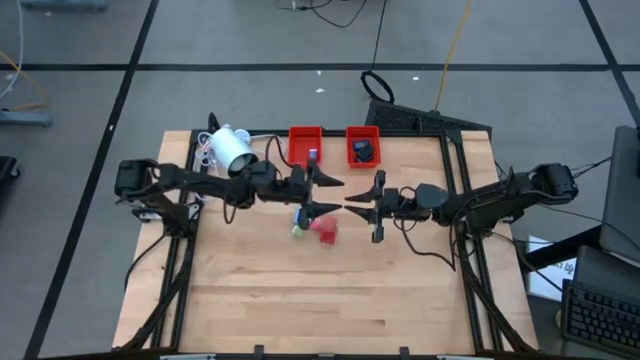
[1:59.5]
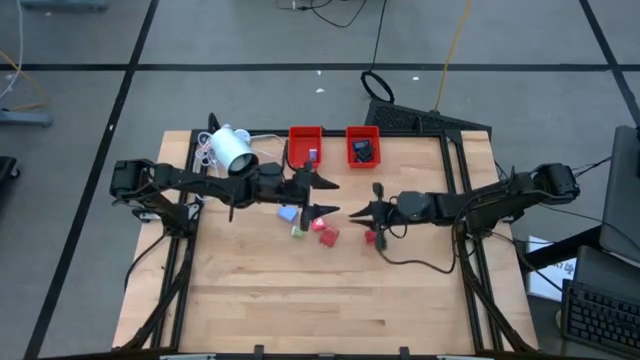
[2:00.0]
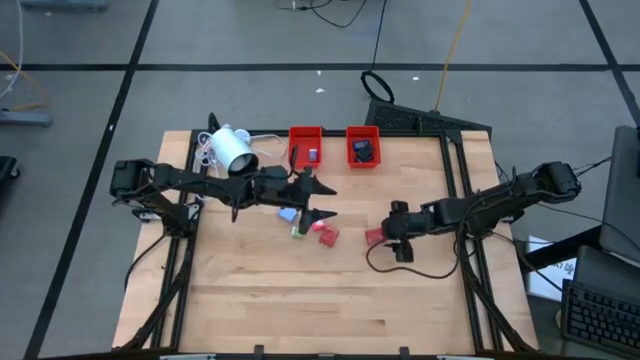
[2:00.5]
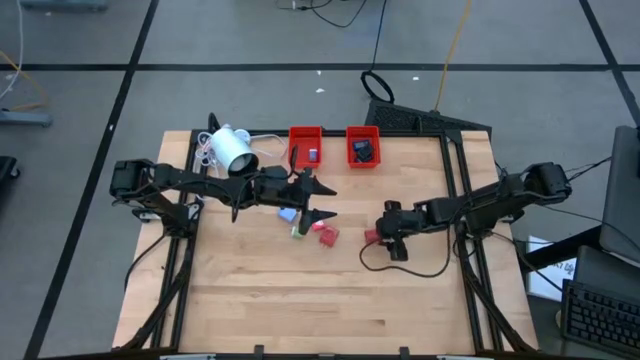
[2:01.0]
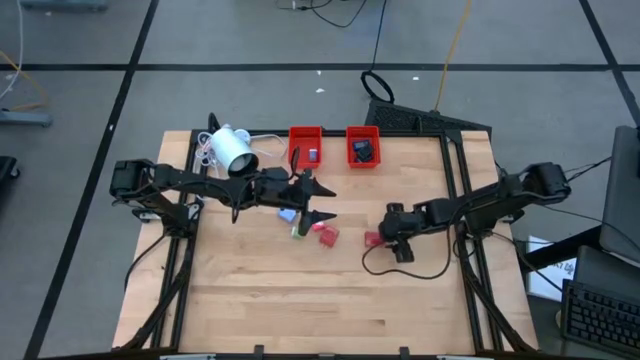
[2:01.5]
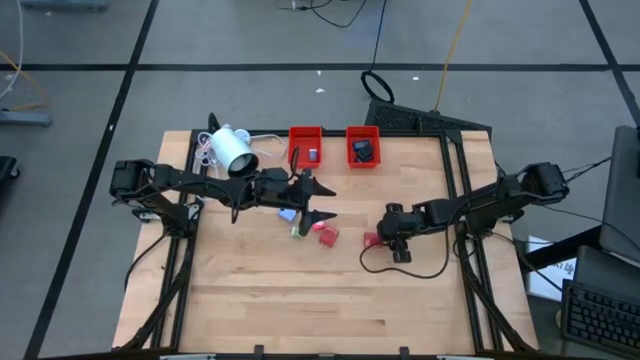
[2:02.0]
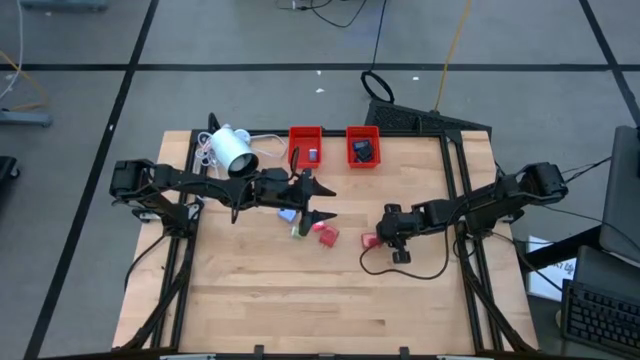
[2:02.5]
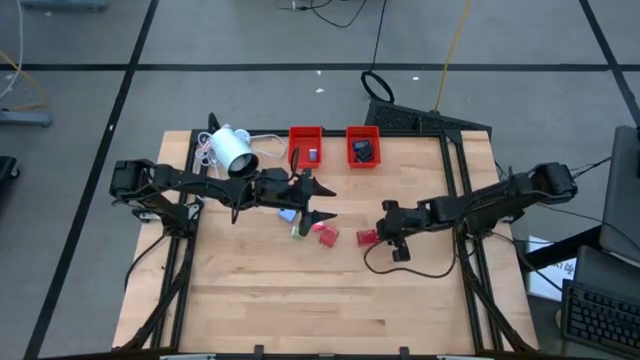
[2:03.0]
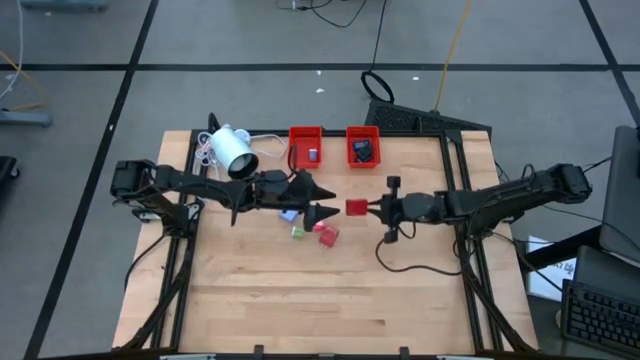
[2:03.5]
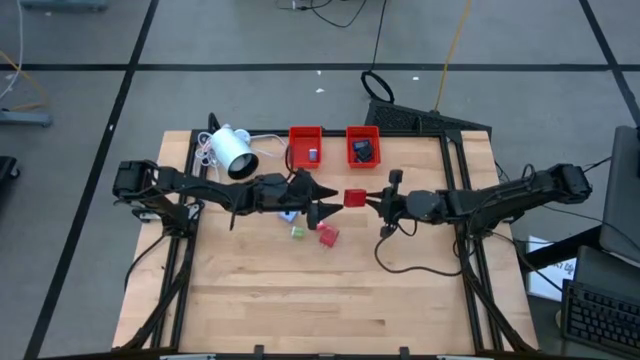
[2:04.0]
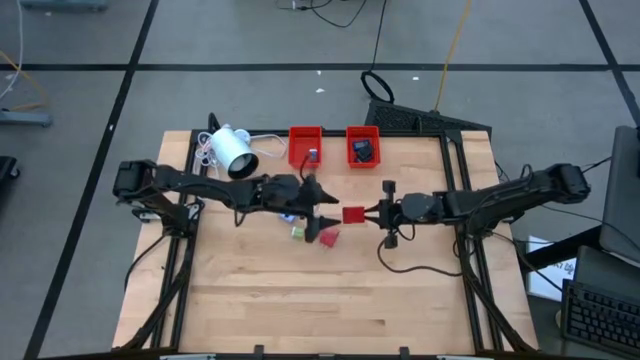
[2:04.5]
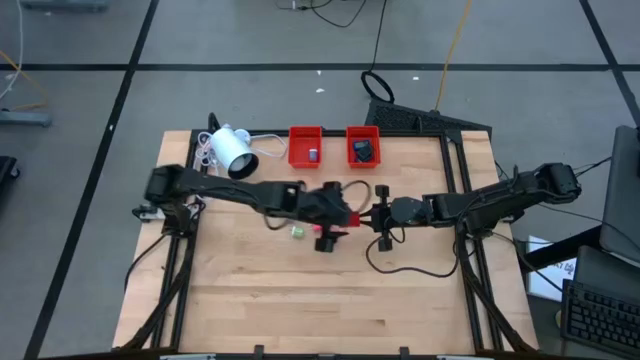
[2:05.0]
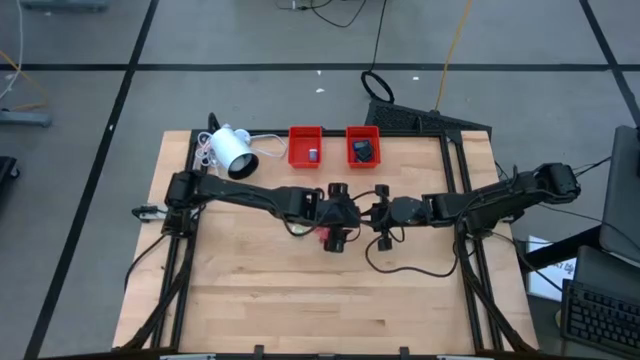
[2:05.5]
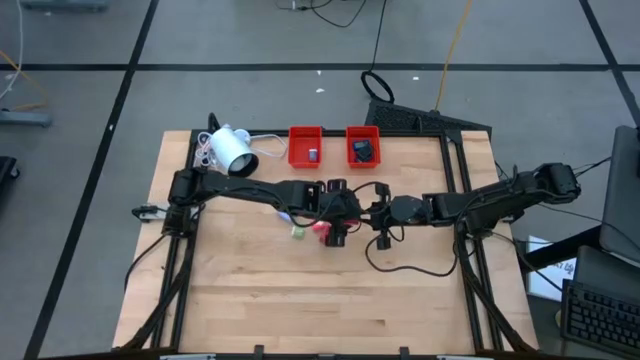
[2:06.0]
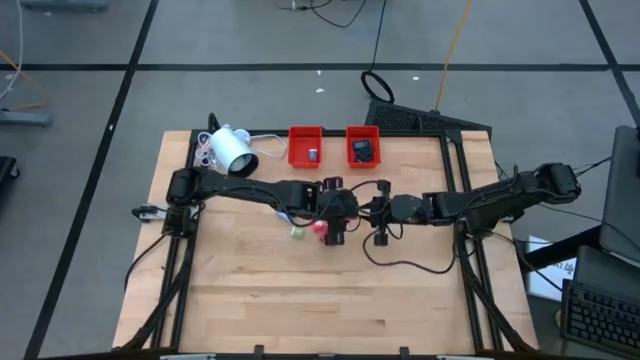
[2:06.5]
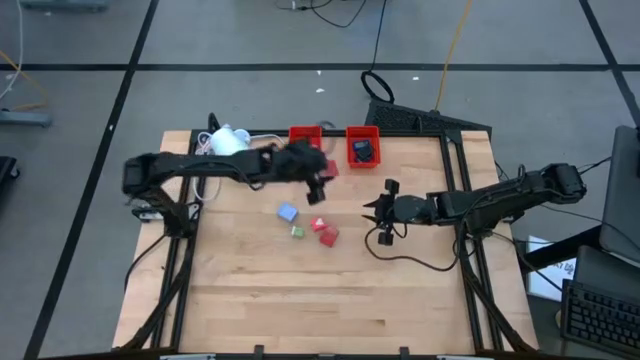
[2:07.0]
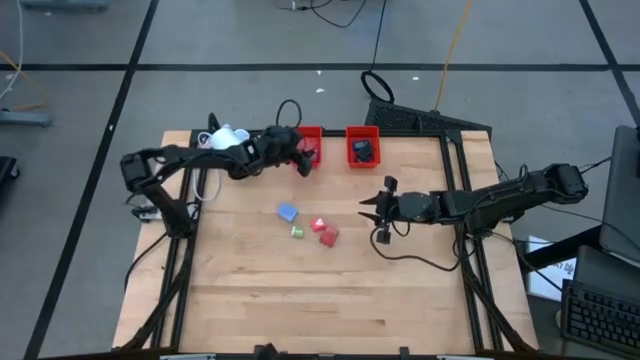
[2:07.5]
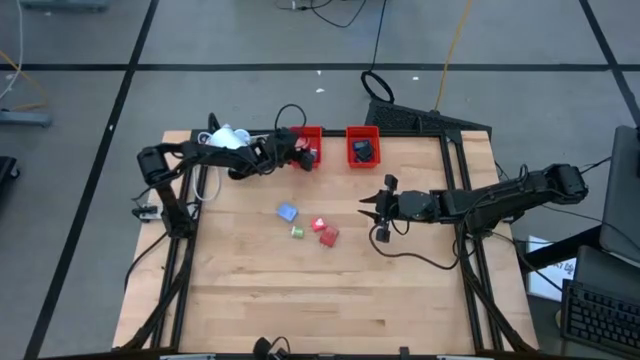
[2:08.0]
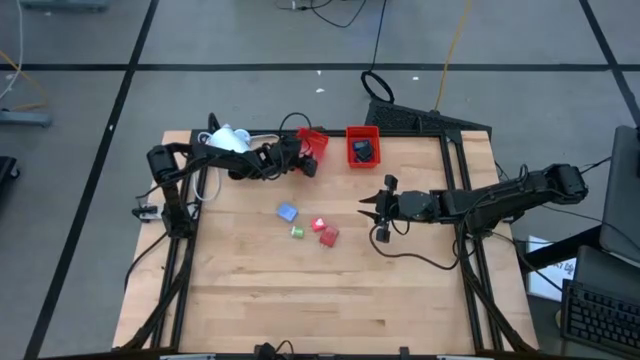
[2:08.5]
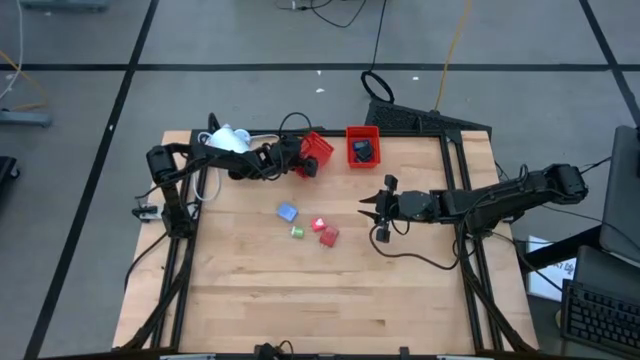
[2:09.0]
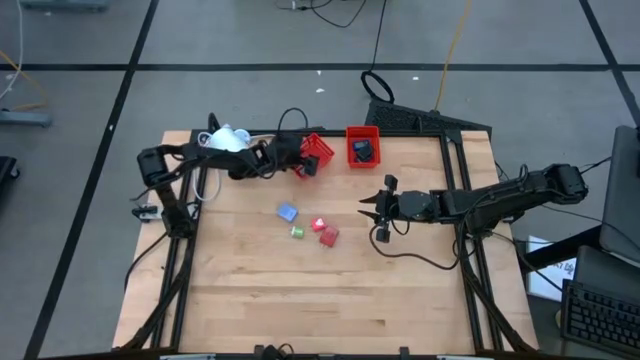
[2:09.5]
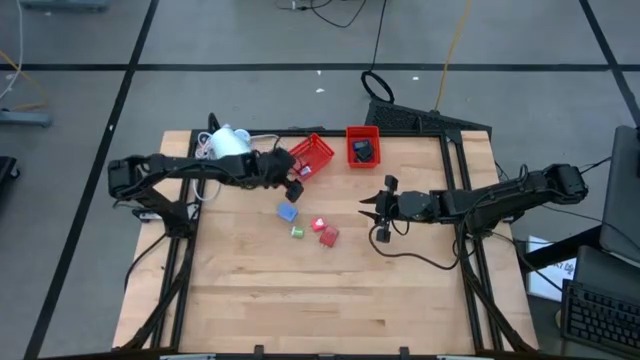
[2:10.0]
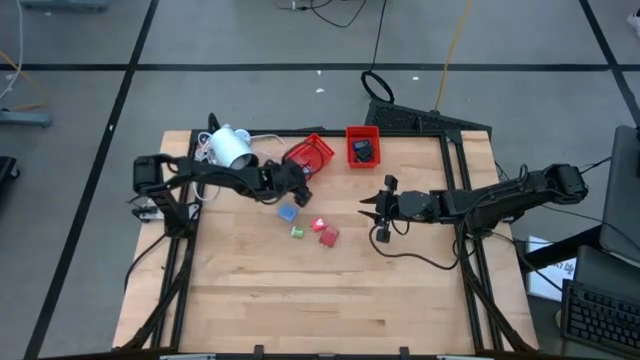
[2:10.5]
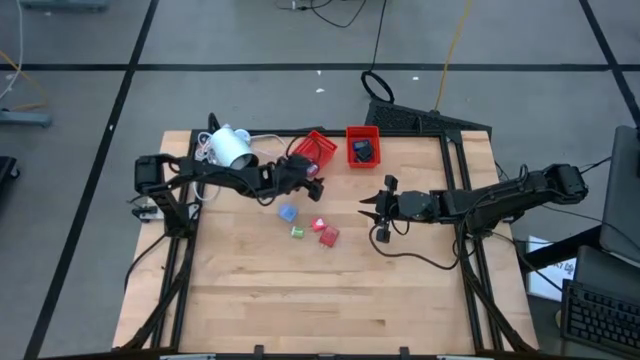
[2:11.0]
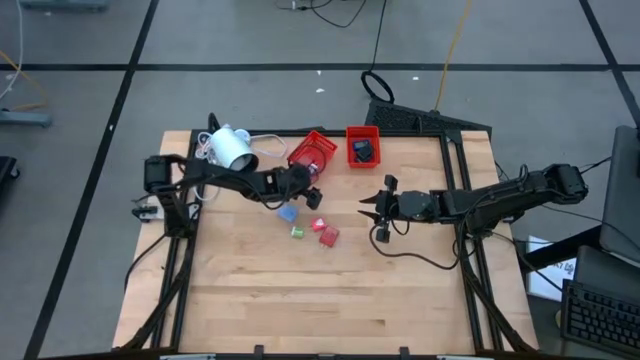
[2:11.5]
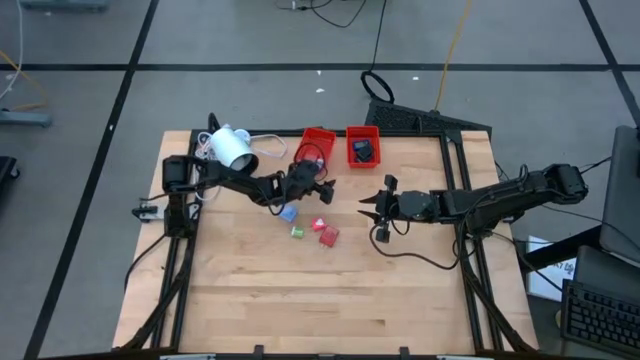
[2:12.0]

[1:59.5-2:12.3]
Task: Pick & Place Office items
Put the right red charger adapter into the left red bin

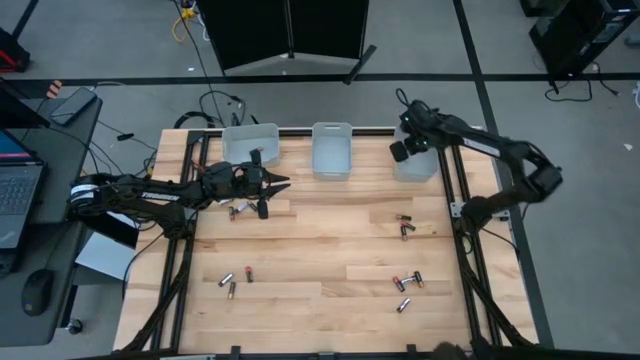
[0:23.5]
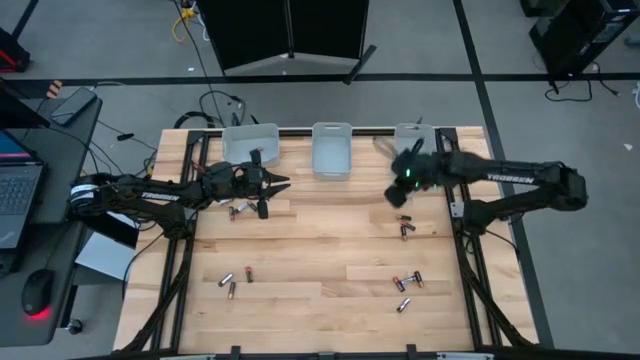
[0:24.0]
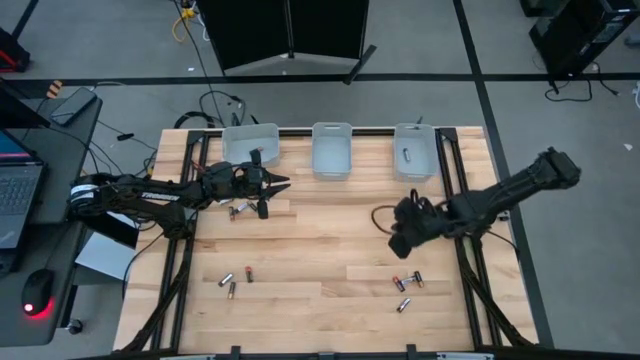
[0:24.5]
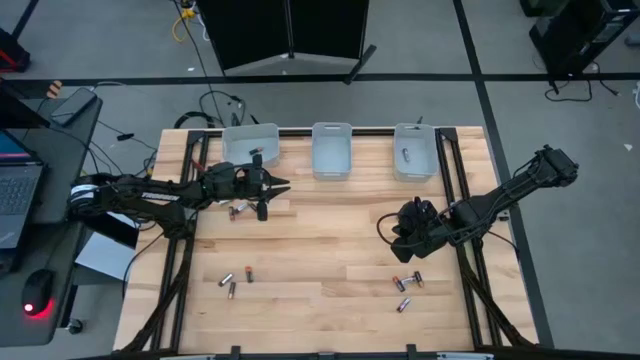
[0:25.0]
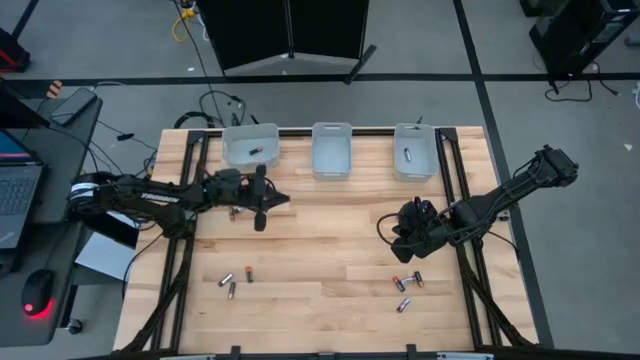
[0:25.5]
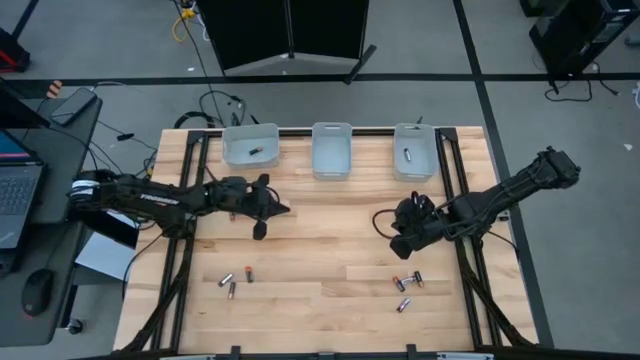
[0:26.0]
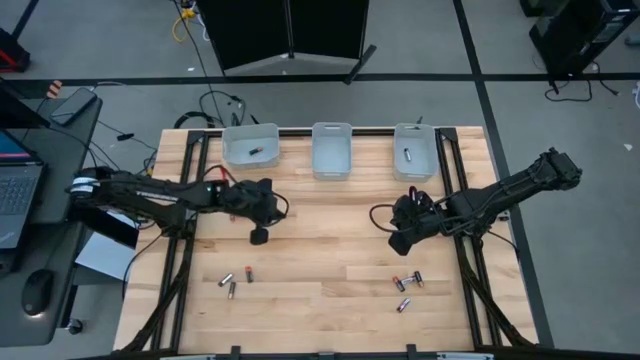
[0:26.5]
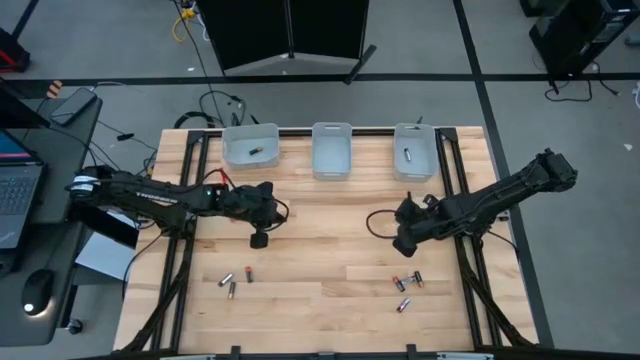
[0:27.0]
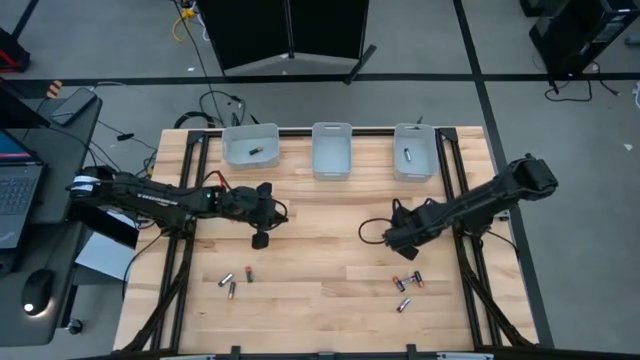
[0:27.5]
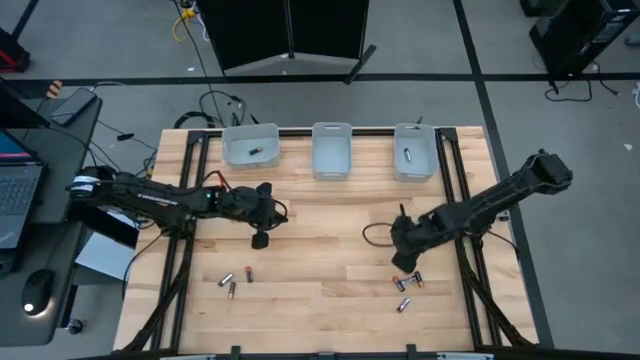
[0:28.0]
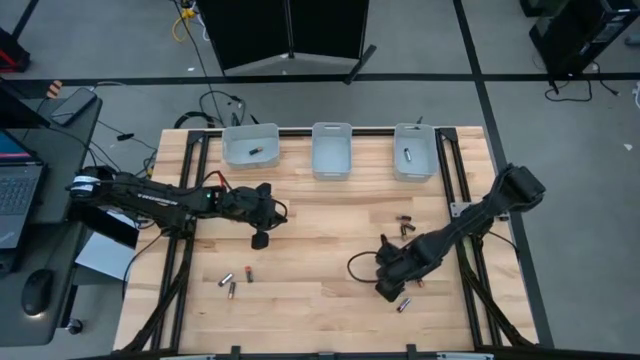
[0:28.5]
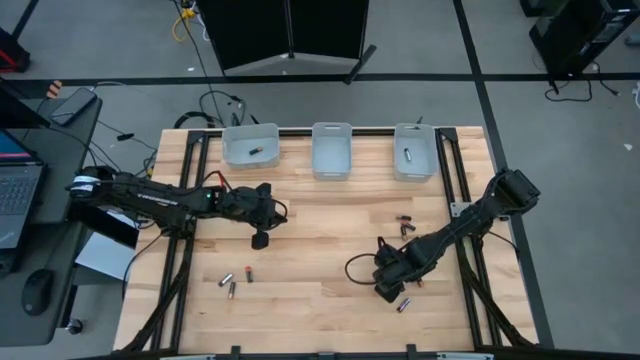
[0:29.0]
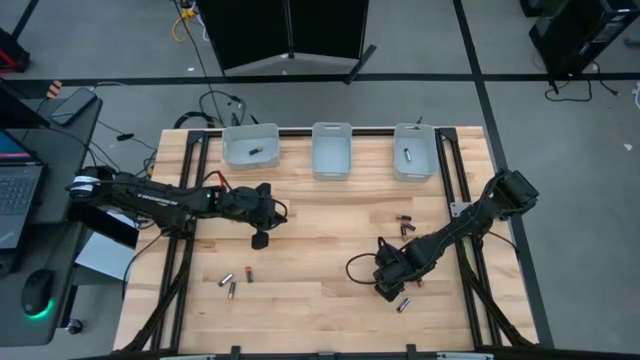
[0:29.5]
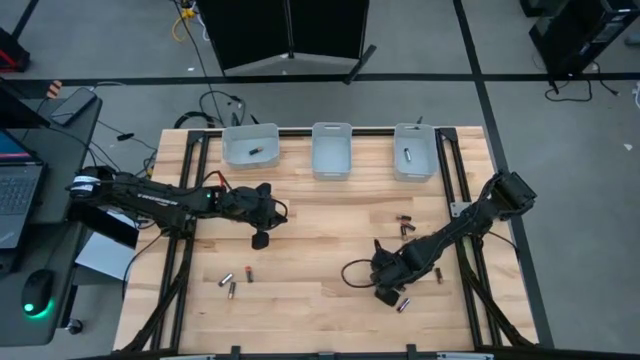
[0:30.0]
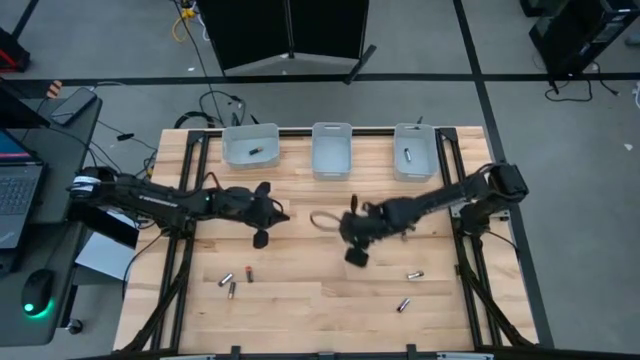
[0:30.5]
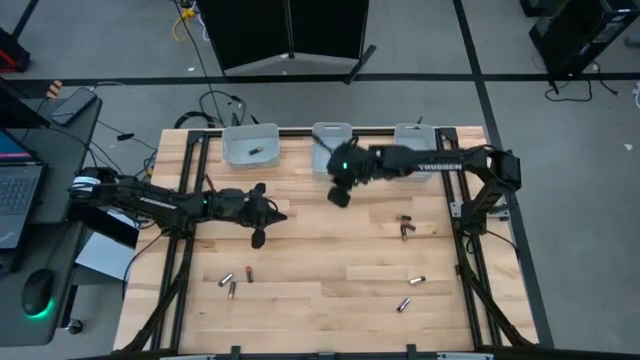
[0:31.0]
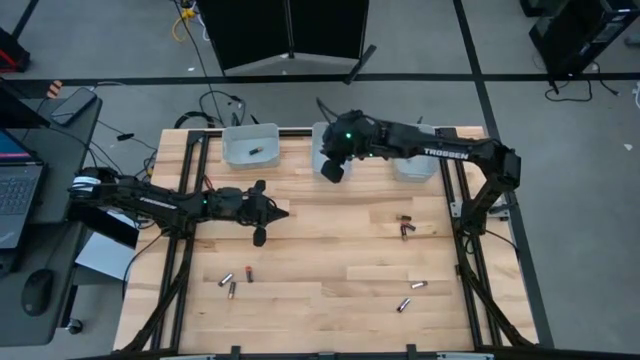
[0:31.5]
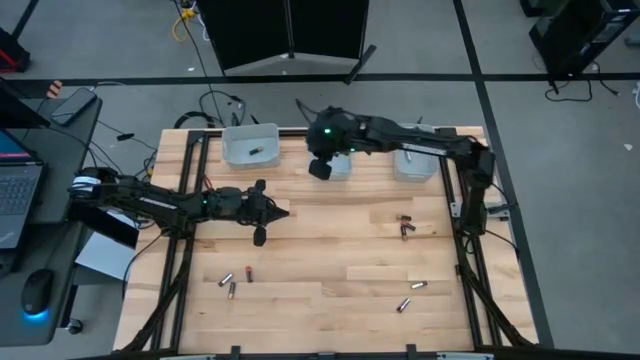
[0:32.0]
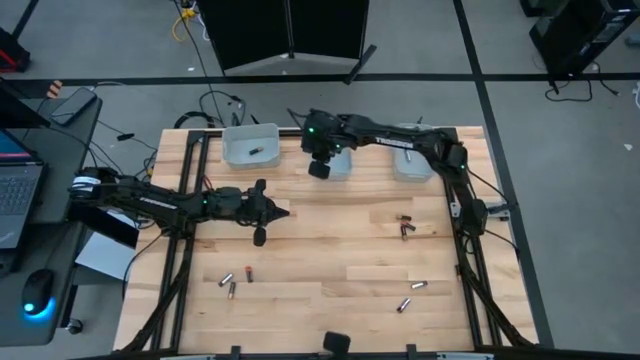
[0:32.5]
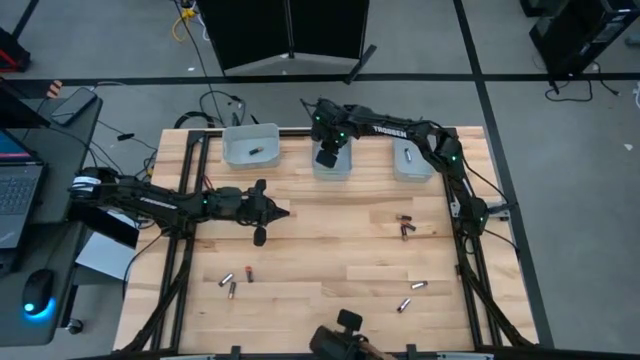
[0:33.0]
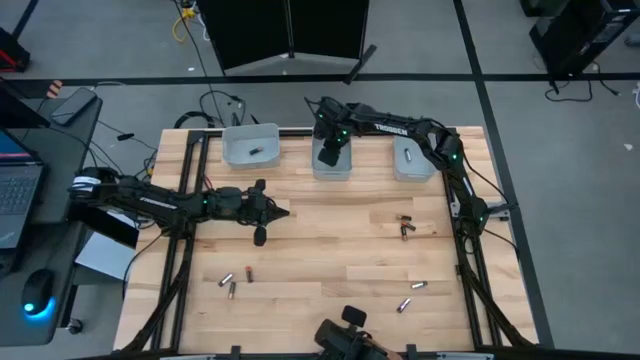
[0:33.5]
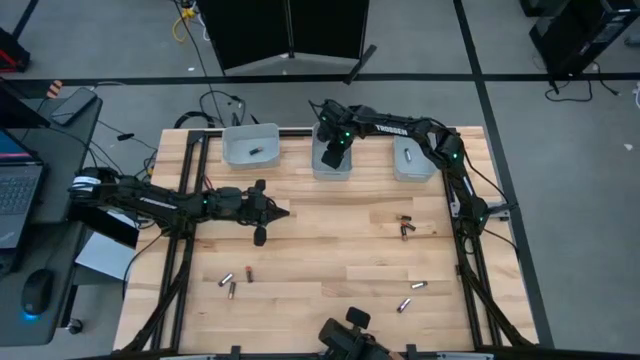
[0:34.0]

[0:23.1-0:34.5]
Task: Sort batteries
Put the black orange battery into the middle bin
